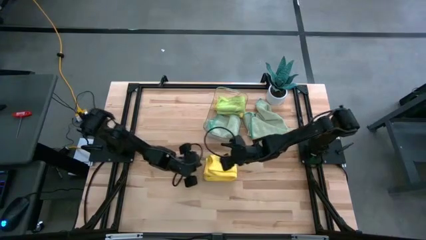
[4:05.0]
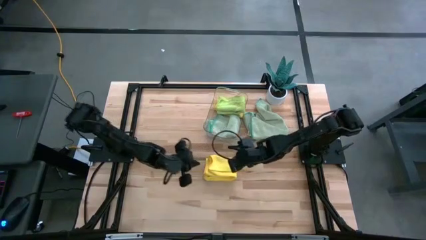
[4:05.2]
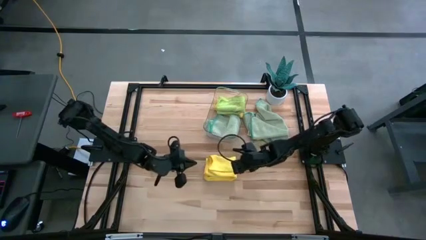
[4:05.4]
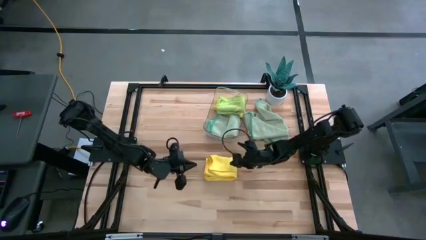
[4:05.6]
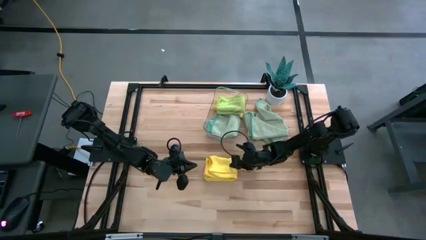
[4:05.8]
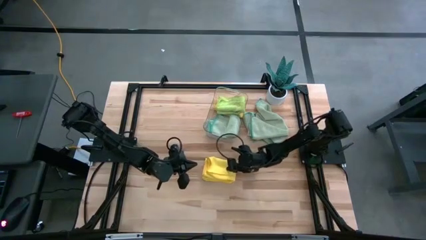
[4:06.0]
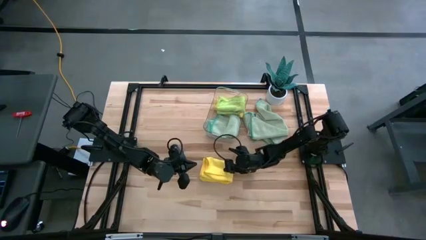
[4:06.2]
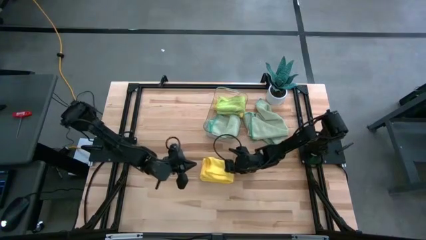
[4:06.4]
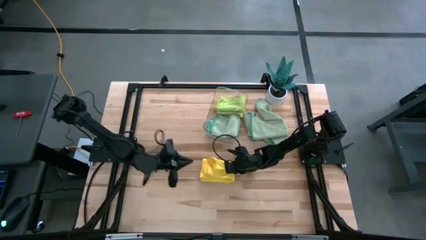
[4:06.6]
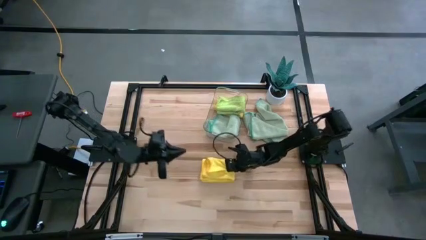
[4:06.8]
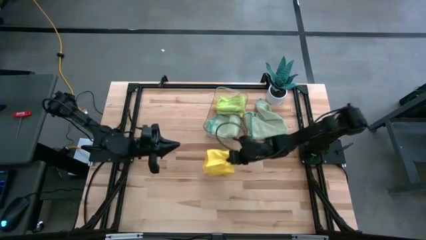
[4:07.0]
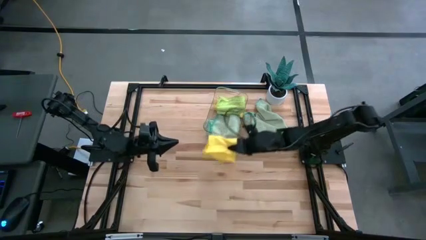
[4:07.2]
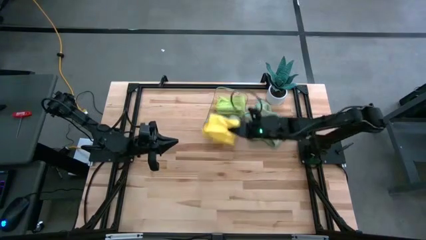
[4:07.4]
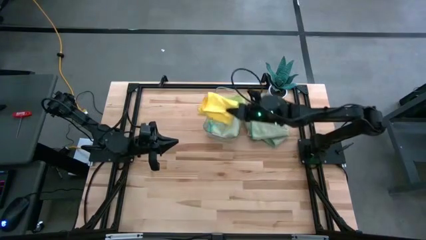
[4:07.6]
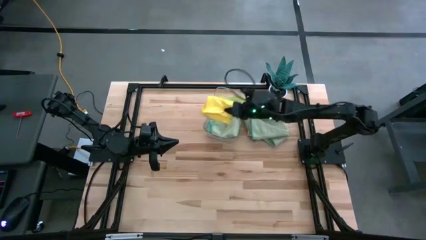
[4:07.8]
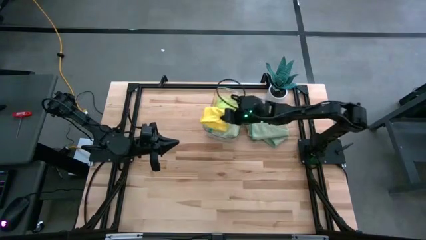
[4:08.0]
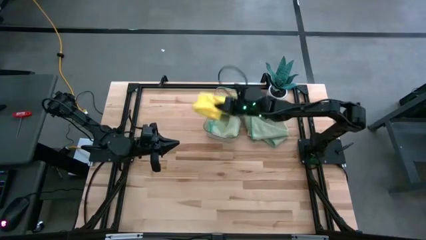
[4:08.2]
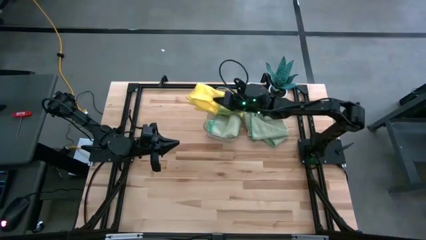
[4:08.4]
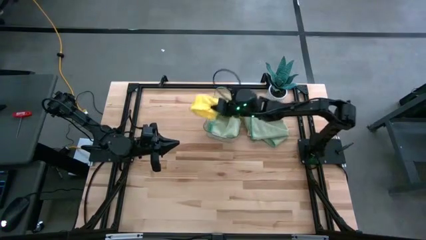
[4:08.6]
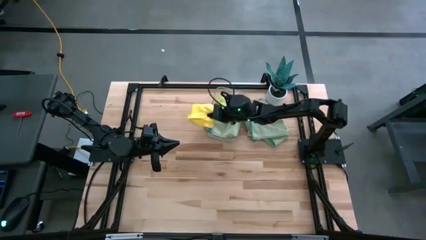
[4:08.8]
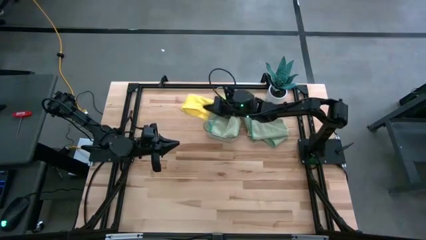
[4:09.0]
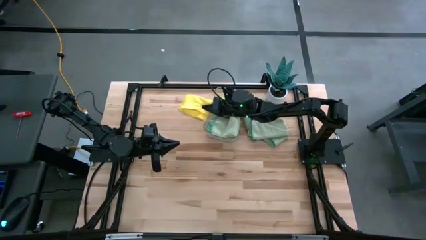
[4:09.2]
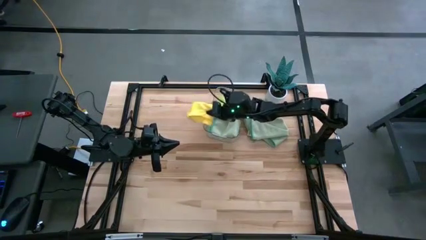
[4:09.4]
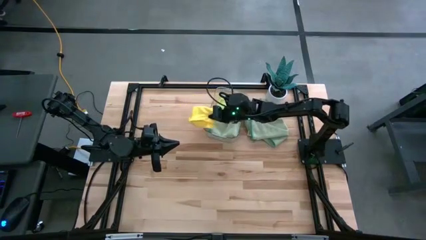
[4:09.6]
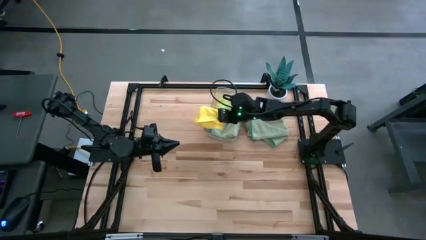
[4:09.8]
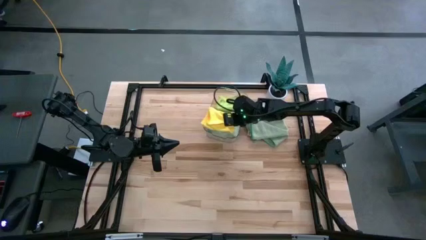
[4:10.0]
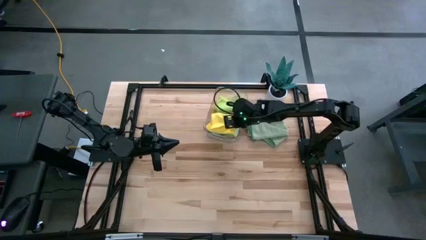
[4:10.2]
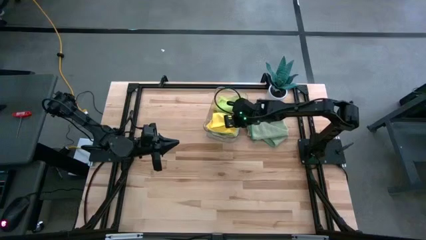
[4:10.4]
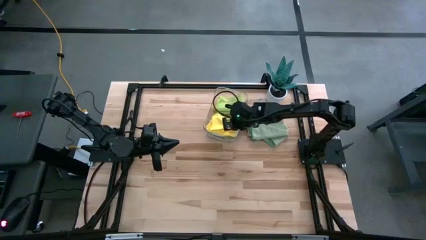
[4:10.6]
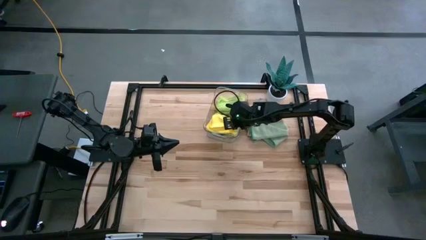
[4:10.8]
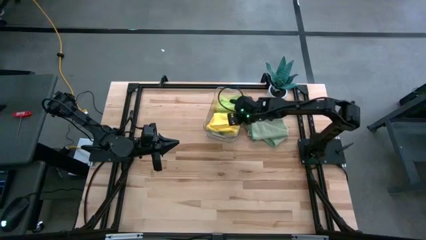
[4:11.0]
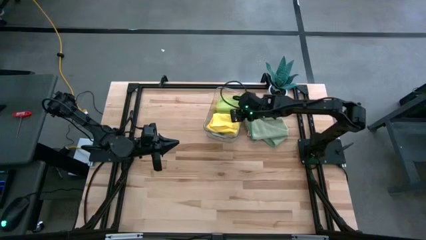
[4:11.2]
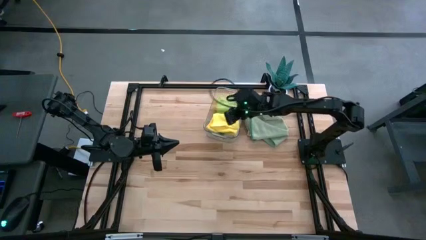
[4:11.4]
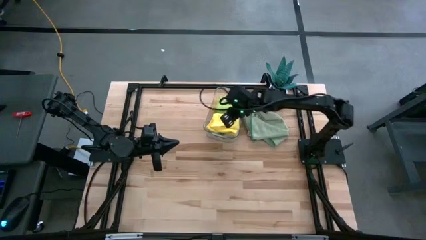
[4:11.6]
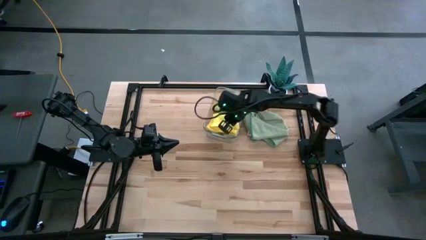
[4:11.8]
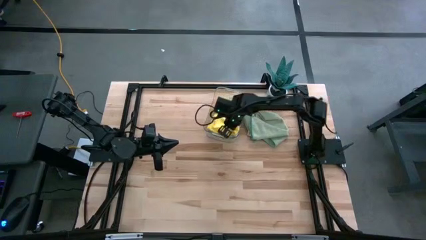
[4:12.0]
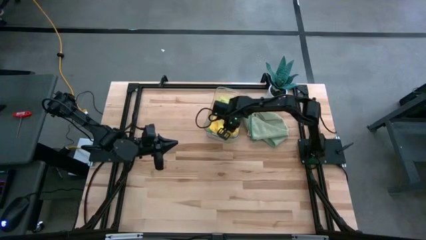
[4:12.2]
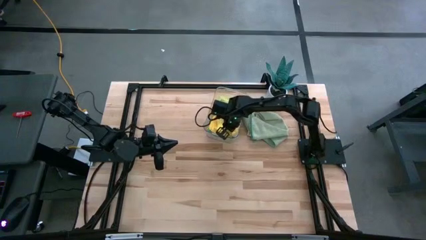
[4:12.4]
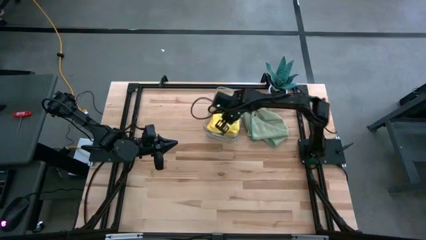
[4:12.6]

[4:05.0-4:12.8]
Task: Fold microfiber towels
Put the folded yellow towel into the transparent bin

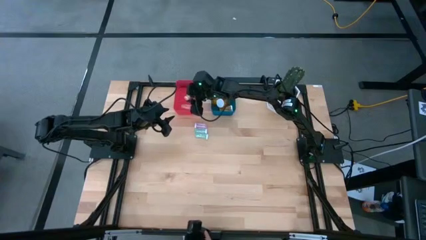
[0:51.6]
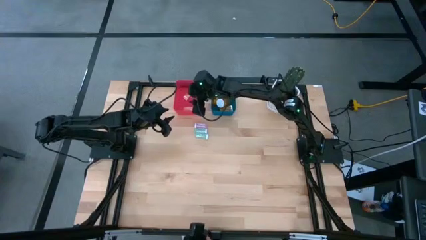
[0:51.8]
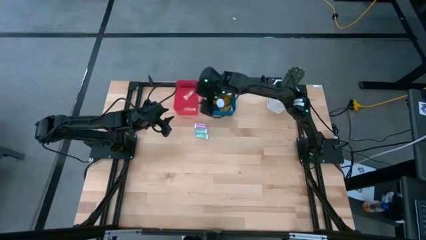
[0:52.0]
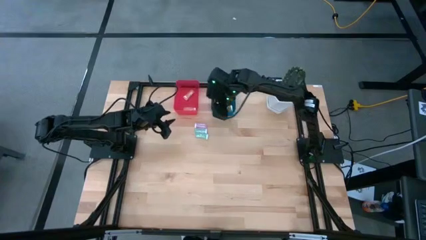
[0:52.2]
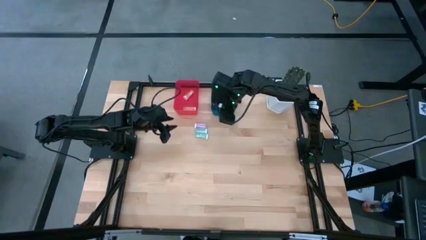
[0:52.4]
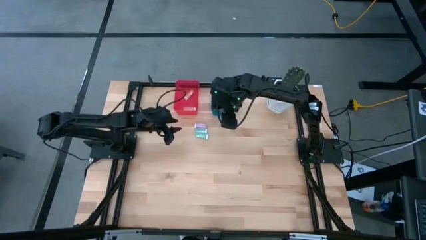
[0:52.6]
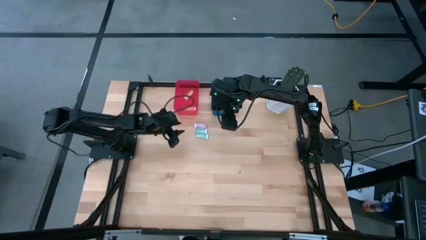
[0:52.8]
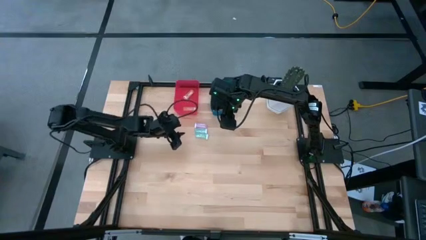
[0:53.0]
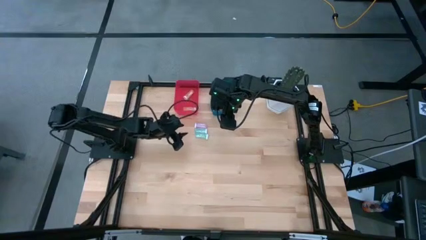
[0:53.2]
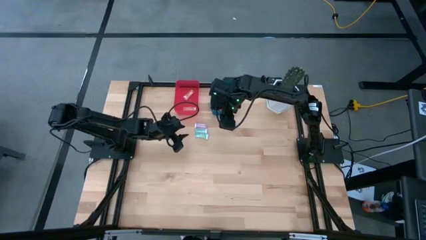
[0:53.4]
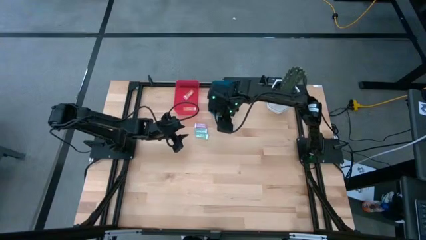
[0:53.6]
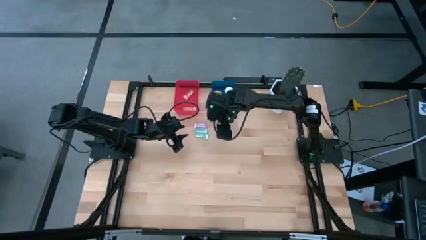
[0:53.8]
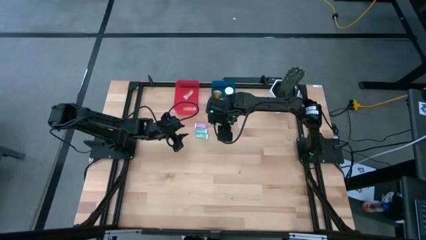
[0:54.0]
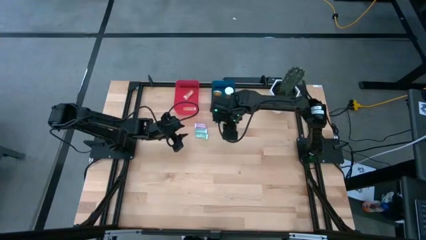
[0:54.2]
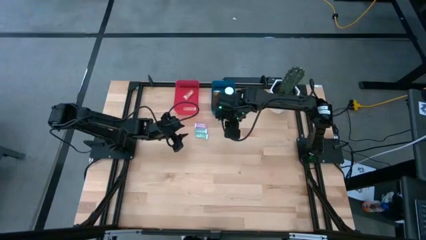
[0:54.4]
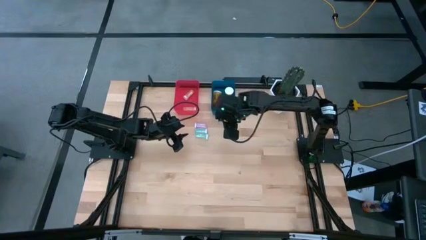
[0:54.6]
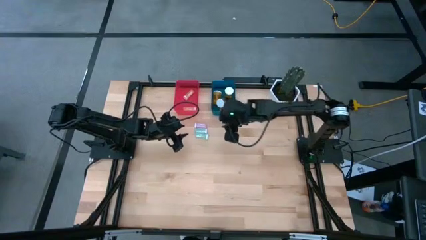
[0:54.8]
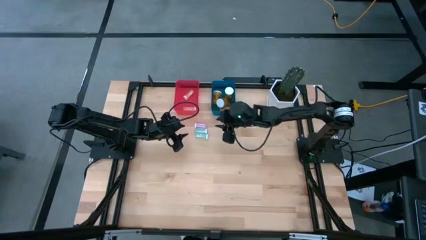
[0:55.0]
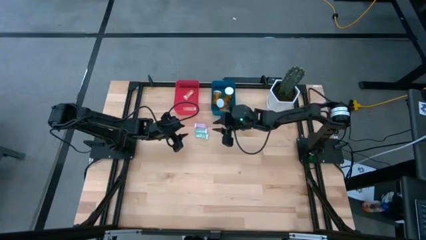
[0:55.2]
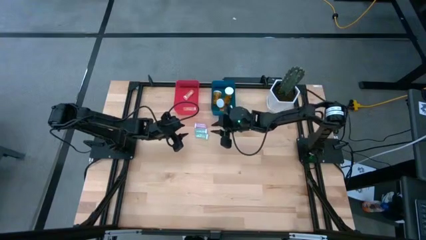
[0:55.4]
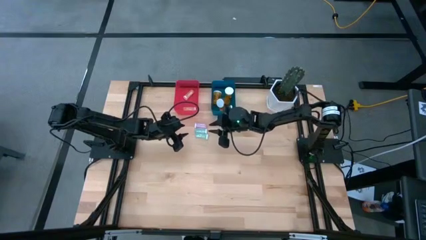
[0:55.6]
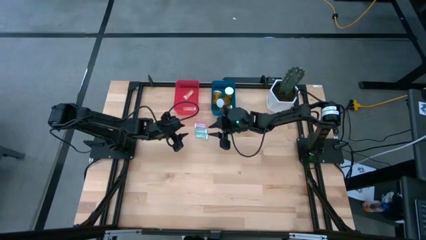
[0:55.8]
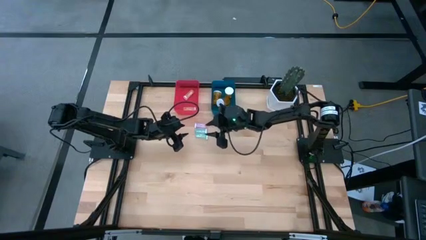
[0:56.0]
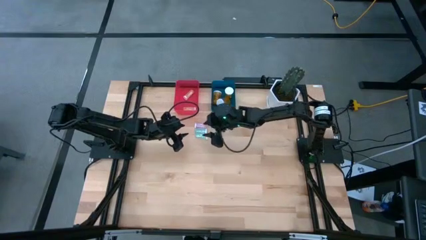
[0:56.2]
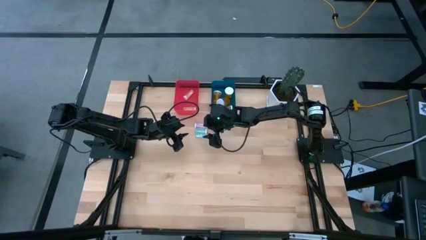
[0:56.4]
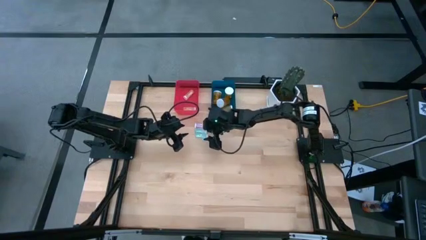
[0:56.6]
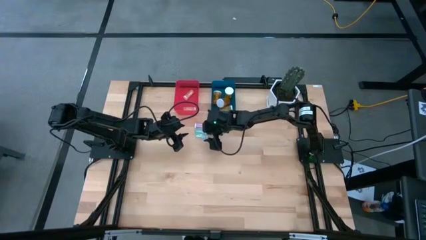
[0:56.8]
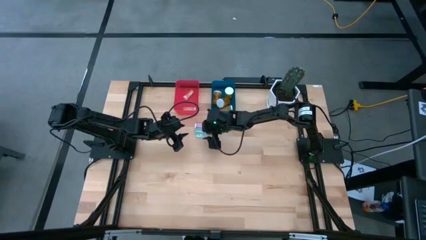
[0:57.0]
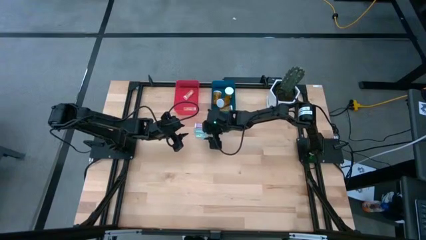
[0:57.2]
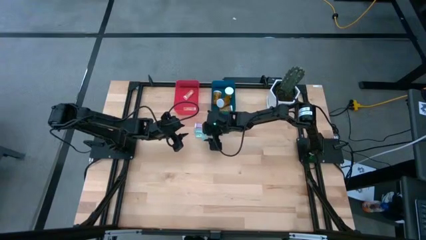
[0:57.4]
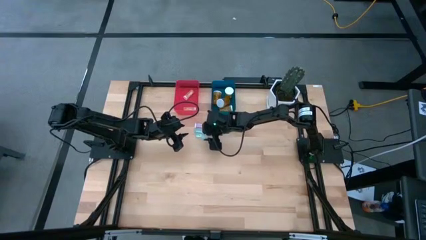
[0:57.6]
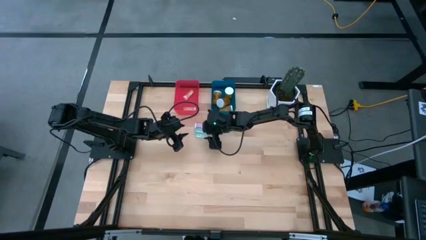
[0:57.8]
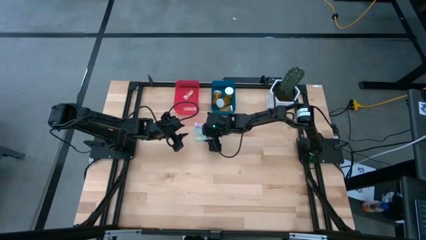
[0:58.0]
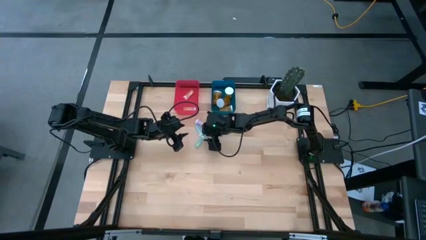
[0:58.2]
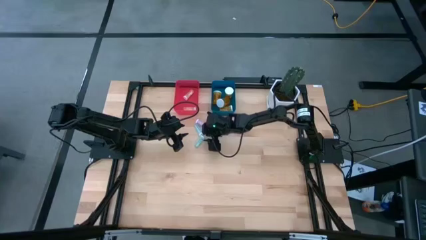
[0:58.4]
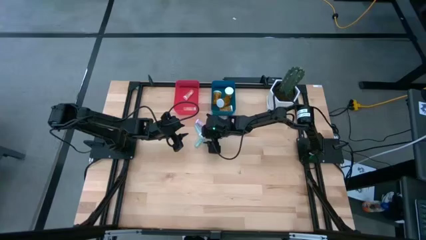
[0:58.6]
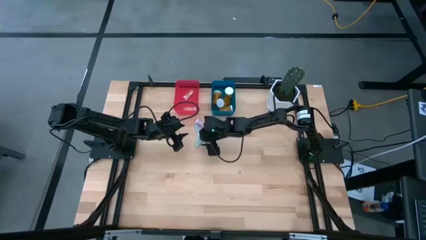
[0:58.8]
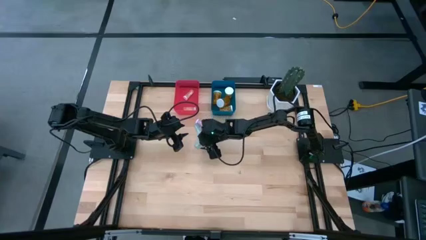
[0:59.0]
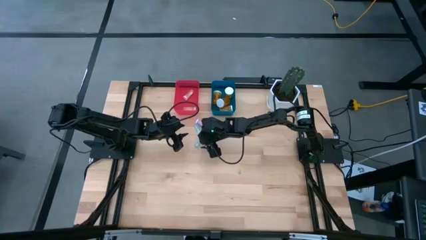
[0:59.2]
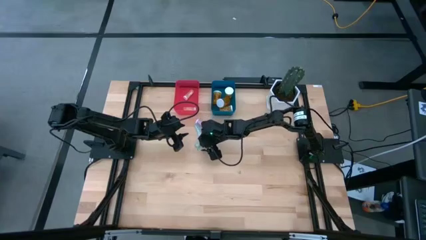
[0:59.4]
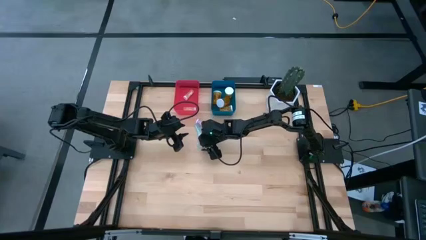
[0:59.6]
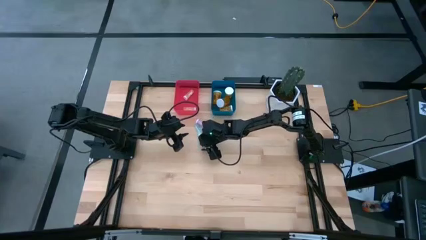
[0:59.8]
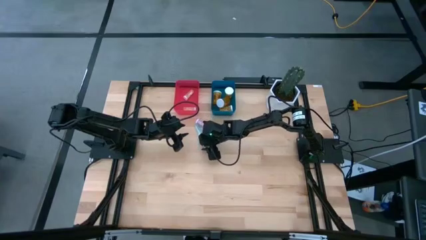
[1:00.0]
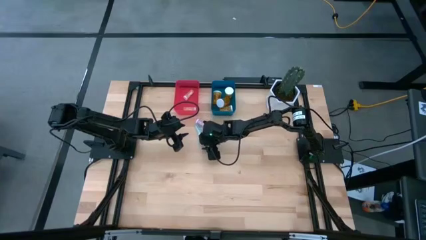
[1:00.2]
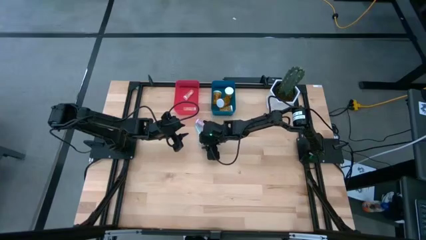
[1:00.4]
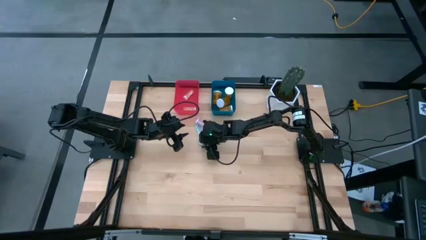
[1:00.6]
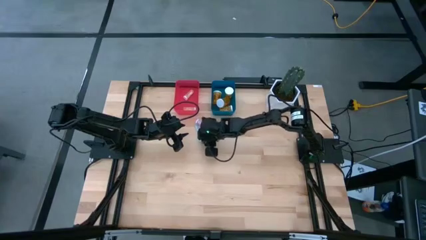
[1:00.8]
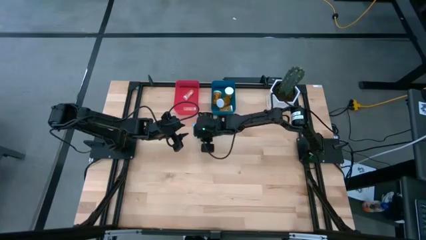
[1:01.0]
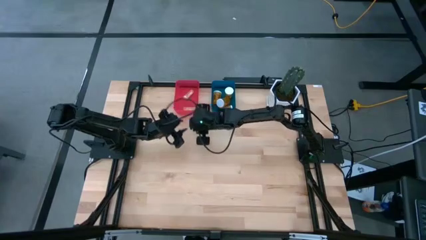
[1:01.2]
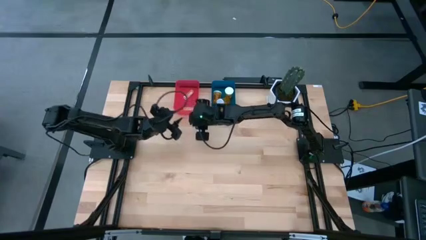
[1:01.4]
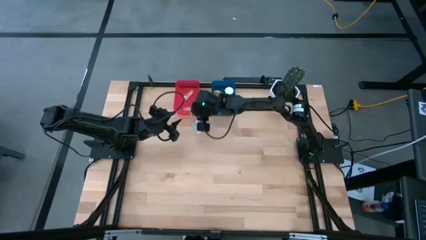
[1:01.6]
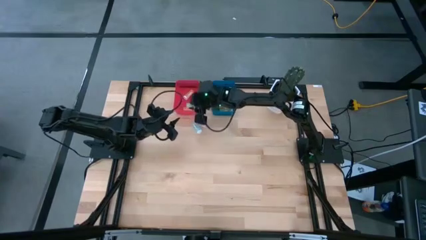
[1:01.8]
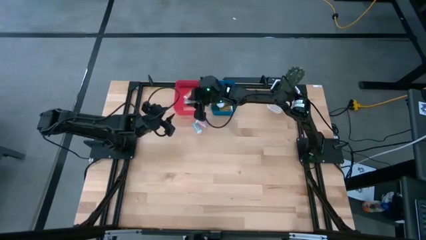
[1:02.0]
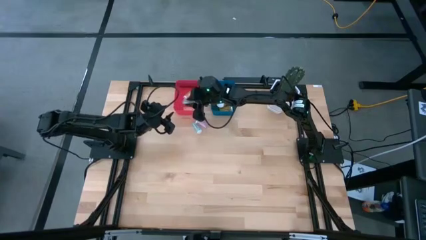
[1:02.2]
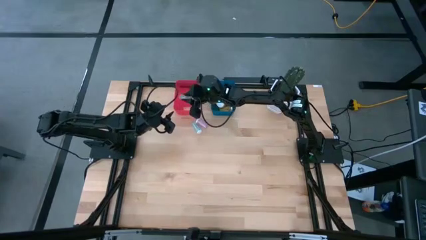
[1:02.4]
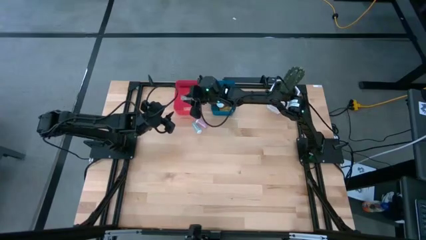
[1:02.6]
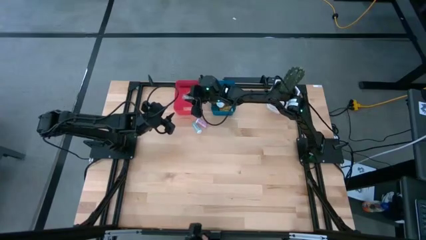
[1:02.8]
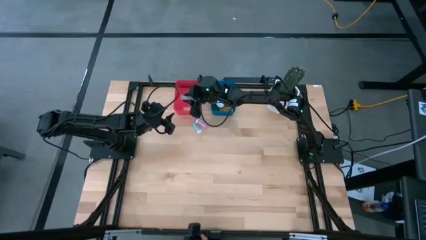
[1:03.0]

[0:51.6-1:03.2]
Task: Pick and place medicine bottles into bin by pill shape (circle, oval)
Put the blue tablet bottle into the red bin
